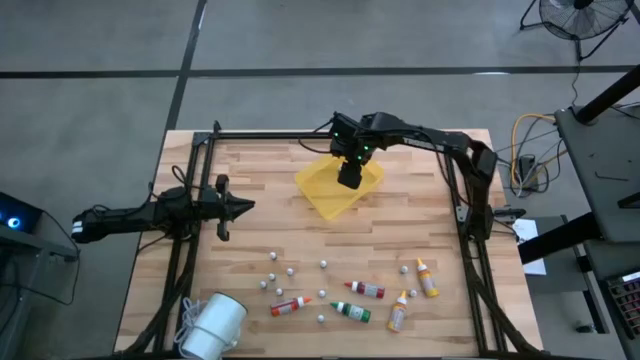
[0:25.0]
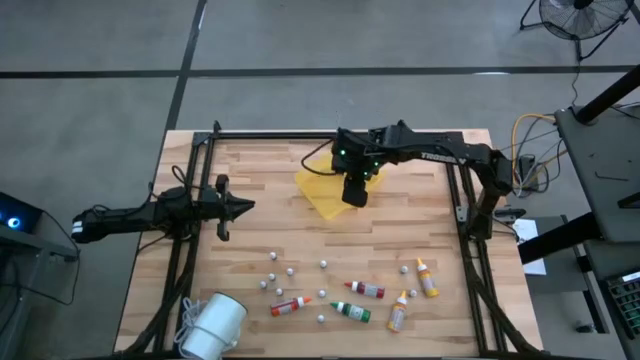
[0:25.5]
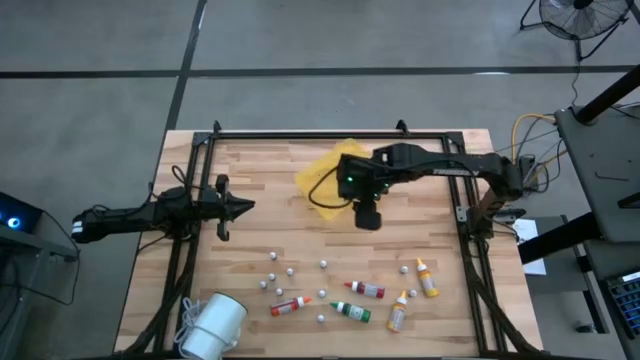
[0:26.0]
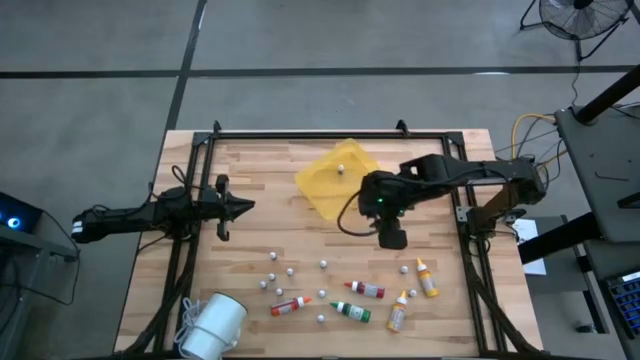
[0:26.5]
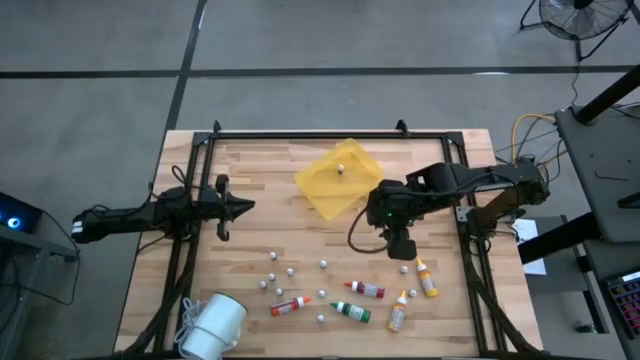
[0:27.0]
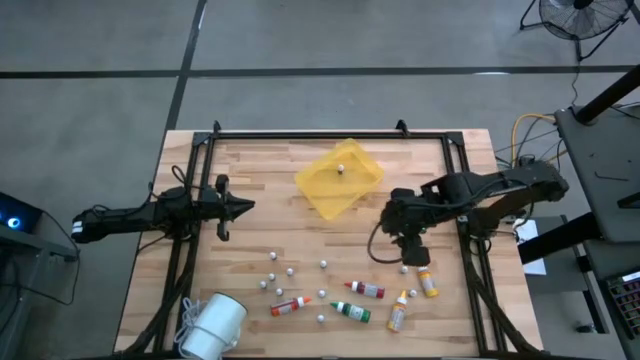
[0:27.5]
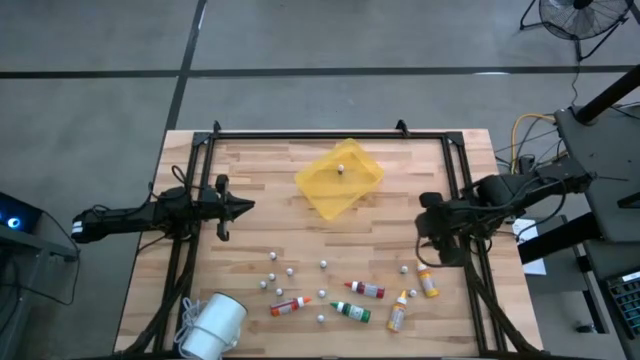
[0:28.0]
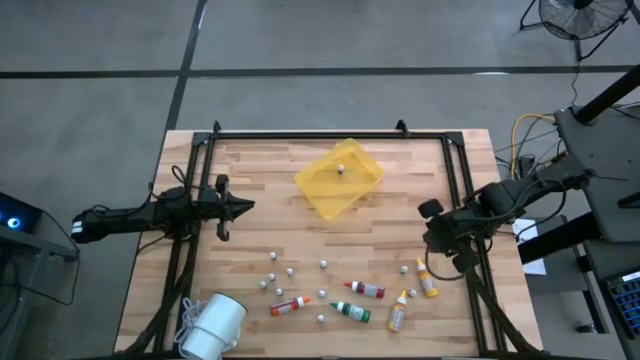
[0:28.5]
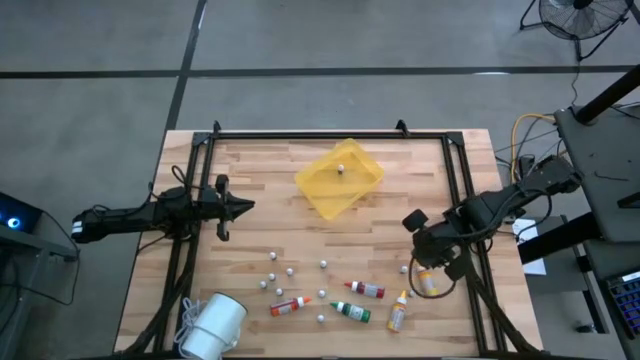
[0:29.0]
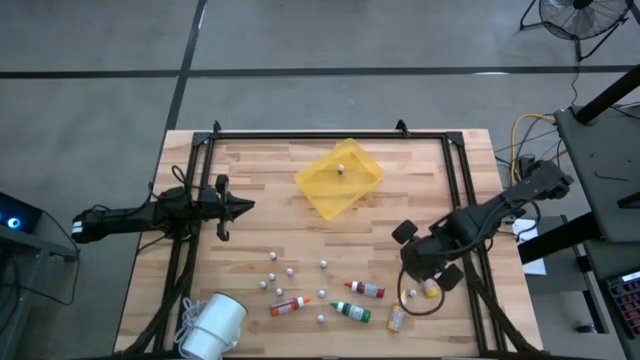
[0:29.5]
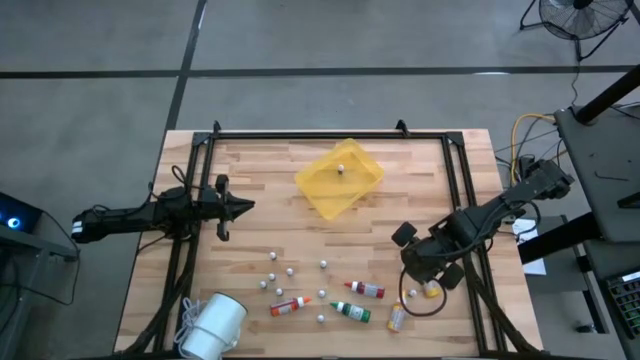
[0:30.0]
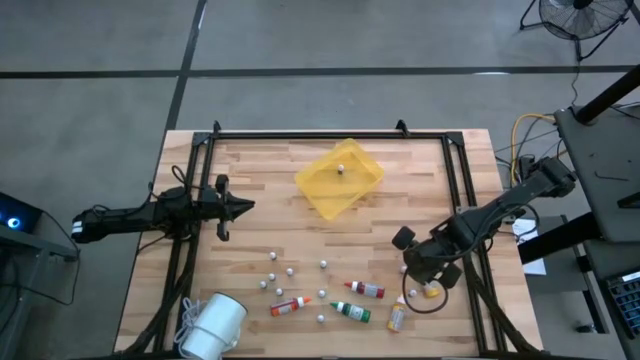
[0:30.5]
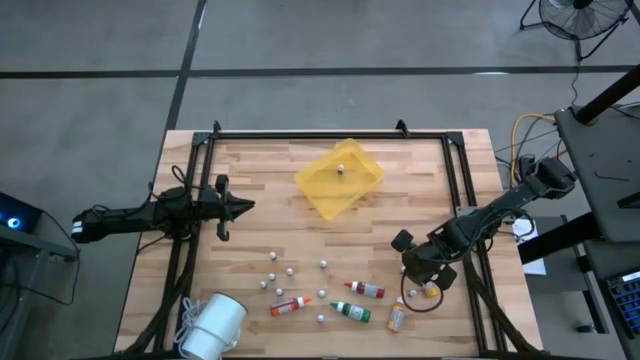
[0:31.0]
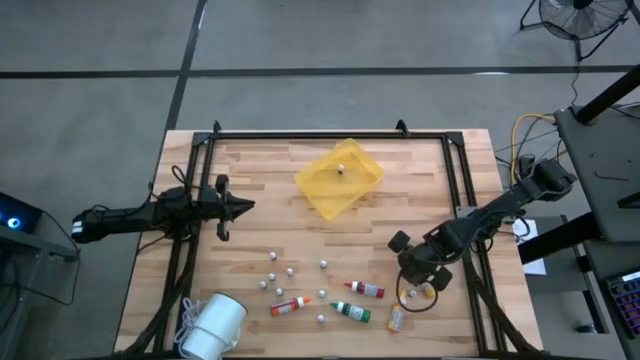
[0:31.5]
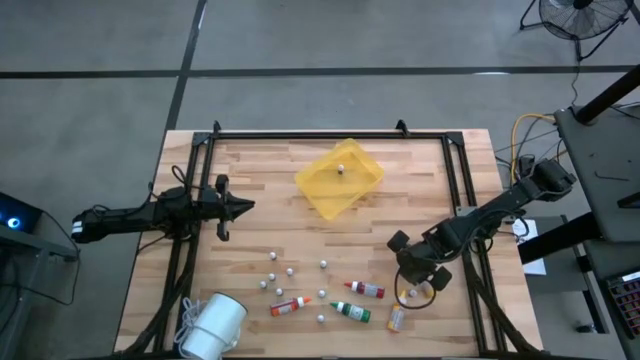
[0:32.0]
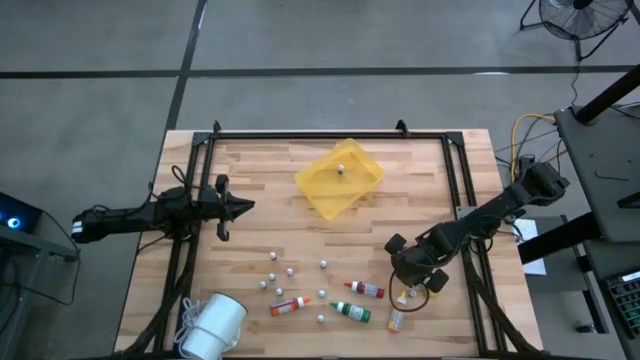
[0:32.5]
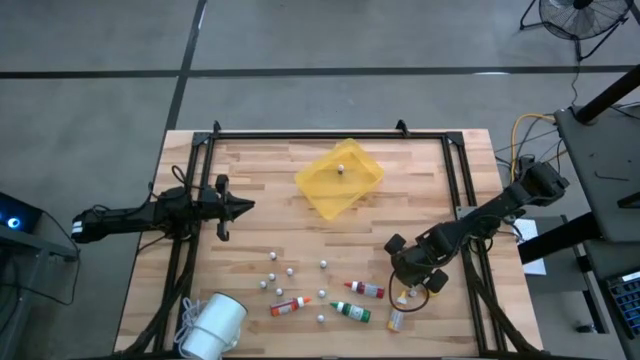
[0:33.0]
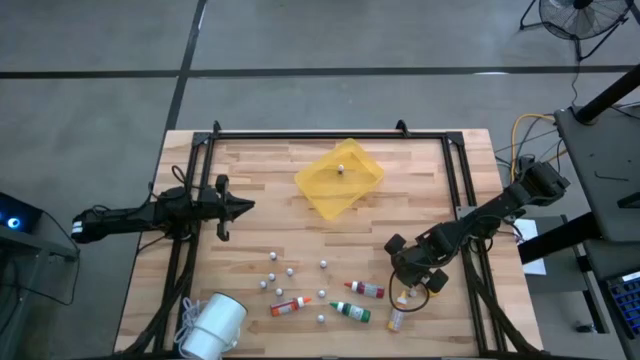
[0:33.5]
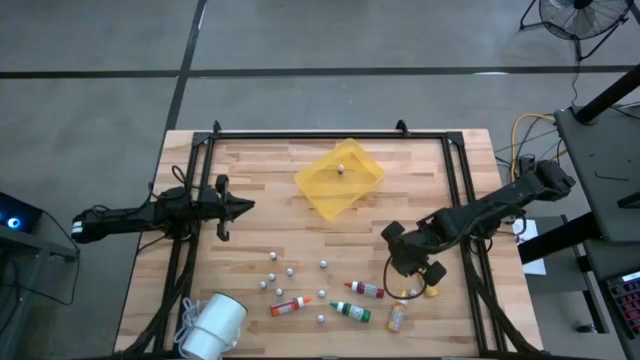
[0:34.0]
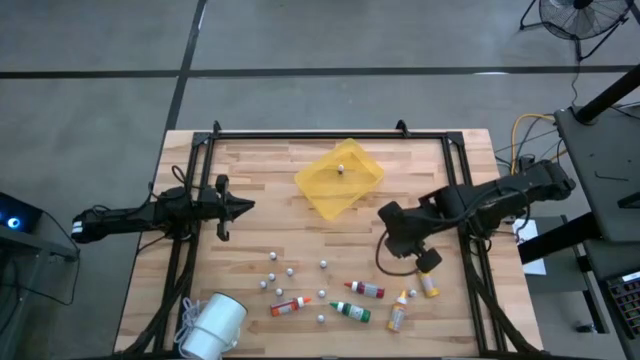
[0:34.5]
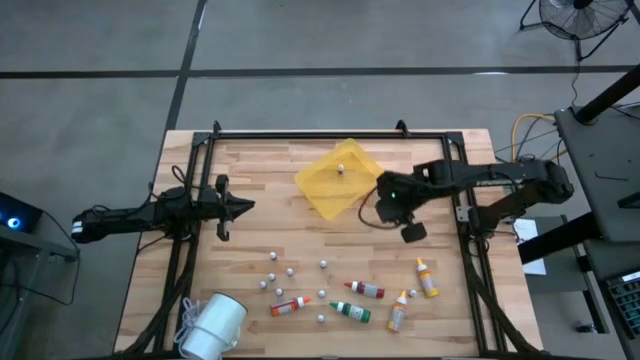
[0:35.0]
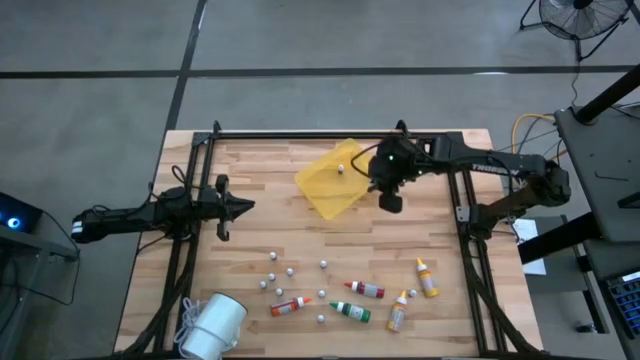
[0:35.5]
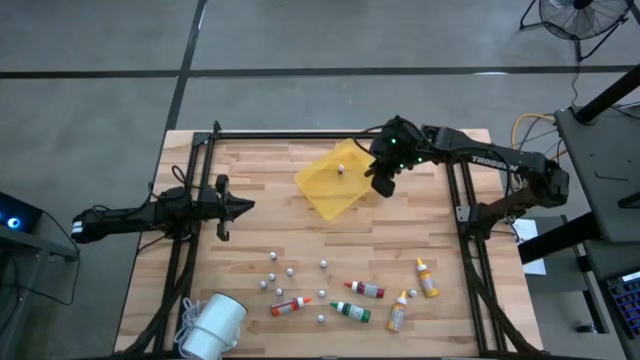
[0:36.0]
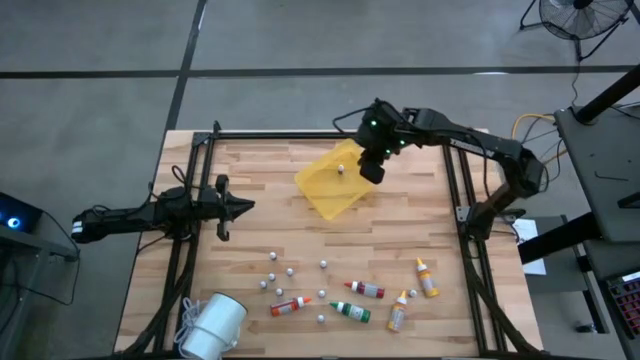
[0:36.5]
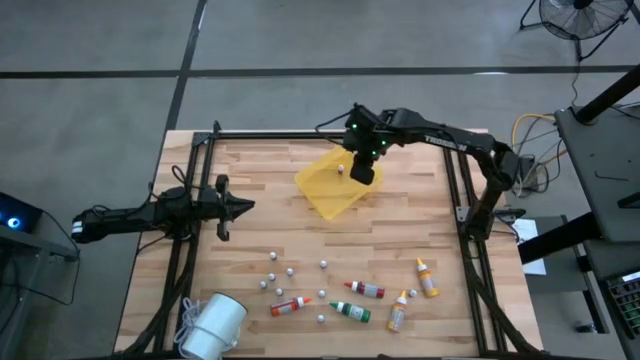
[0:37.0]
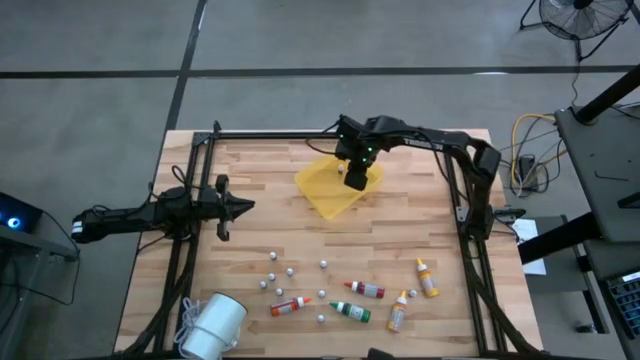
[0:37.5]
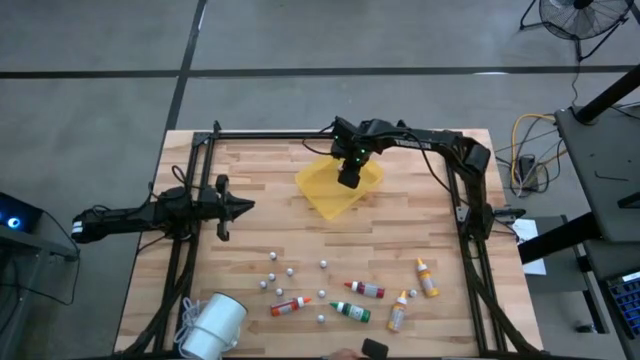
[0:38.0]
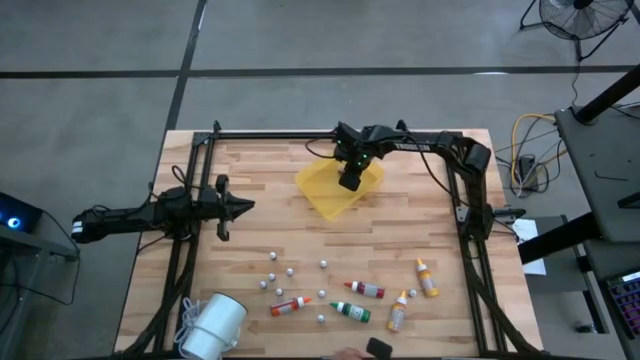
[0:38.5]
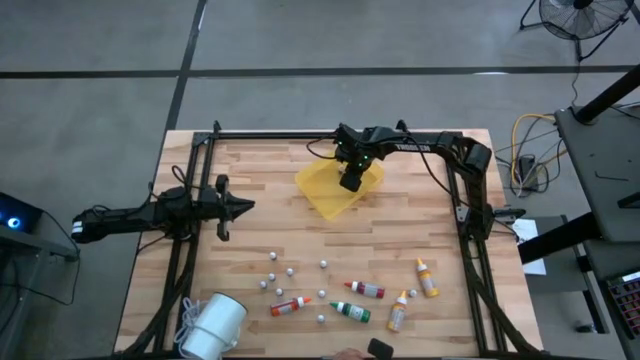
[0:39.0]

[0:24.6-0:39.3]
Task: Pick & Place food coloring
Put the small black food coloring bottle into the yellow bin
